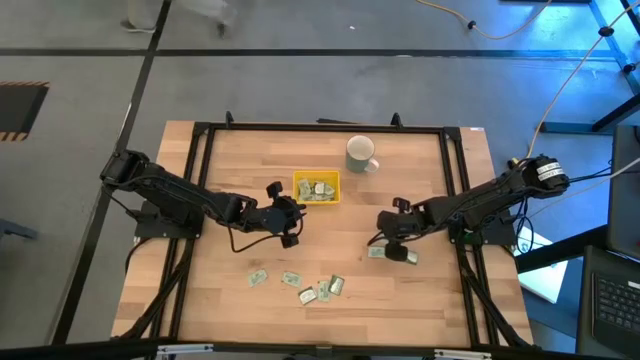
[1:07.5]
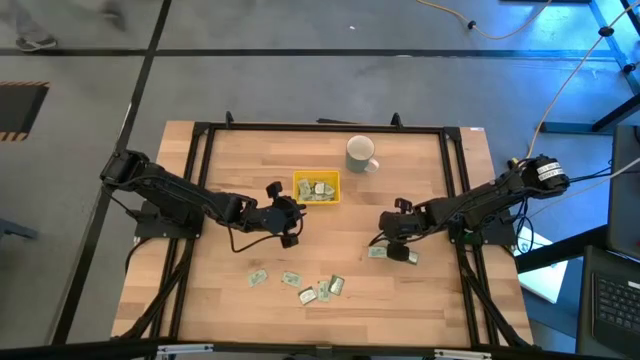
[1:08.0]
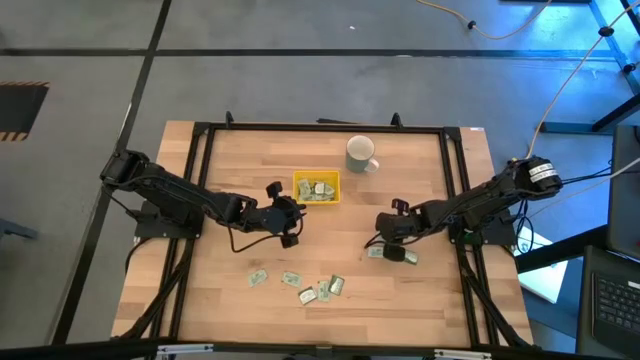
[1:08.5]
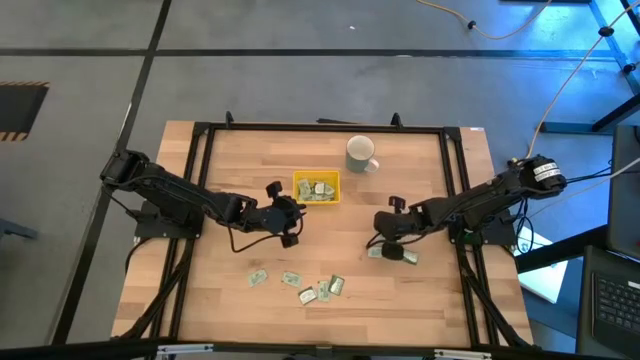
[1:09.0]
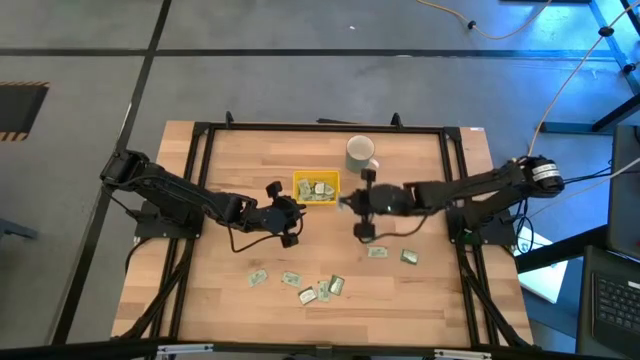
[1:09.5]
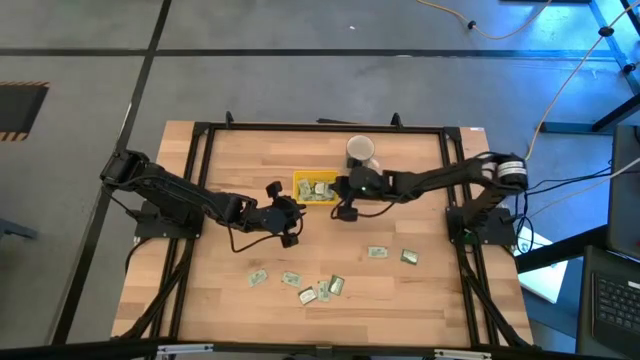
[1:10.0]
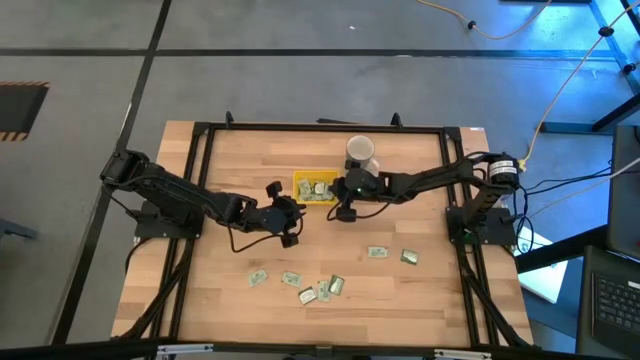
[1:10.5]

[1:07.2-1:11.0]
Task: Pick and place Stevia / Truvia into bins
Put the middle right stevia tea packet into the yellow bin

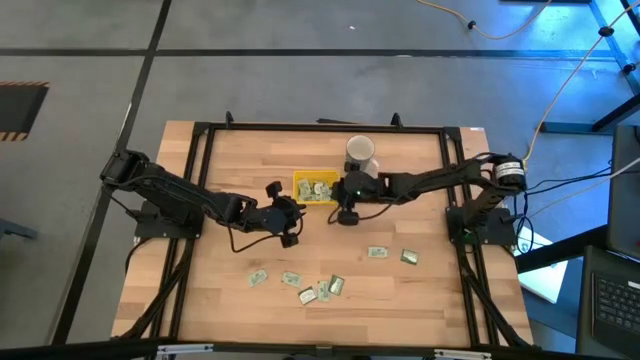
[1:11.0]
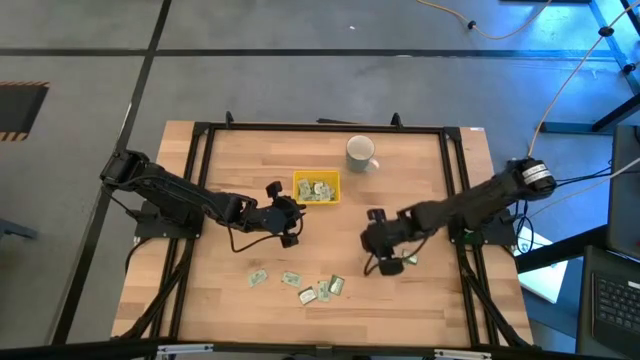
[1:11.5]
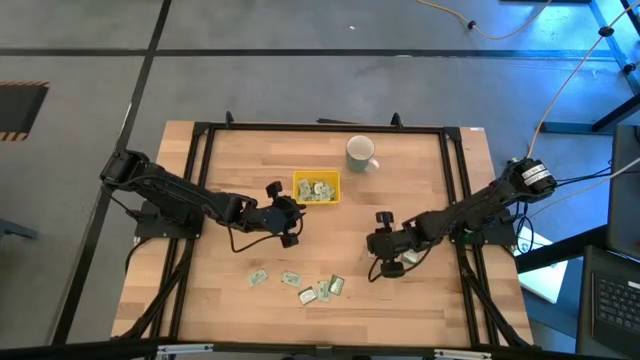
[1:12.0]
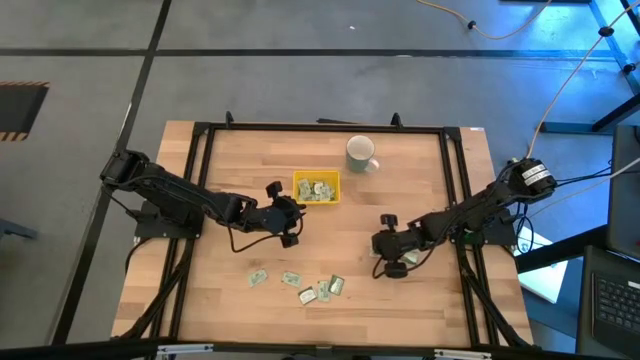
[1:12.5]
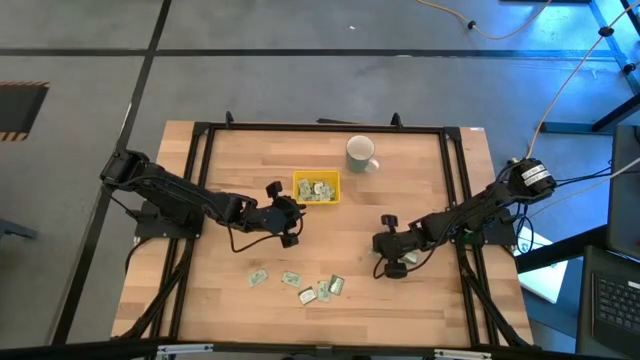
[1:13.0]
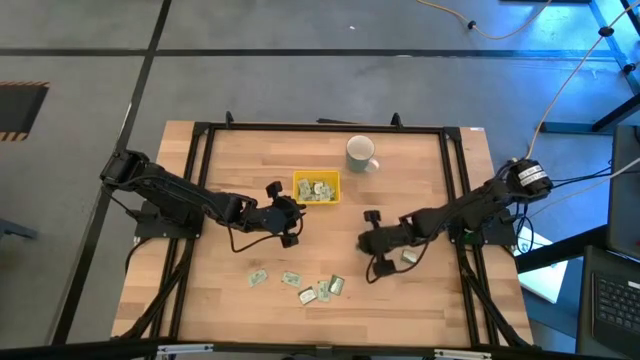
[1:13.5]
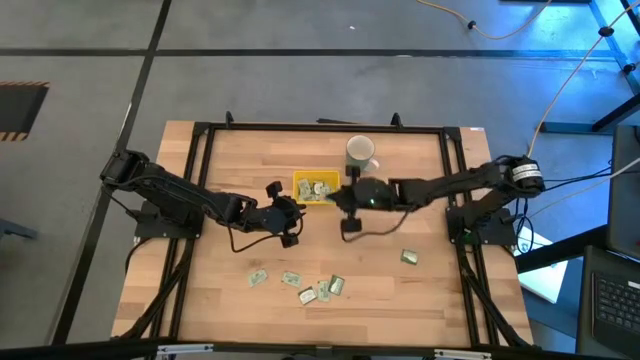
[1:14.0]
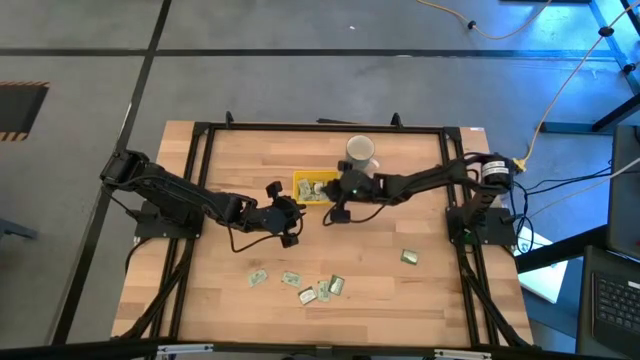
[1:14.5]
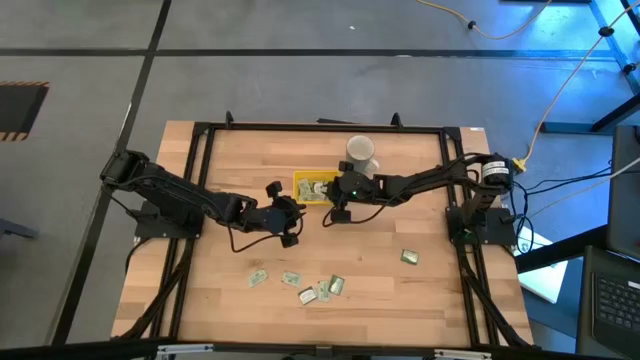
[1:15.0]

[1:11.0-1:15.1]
Put the middle right stevia tea packet into the yellow bin

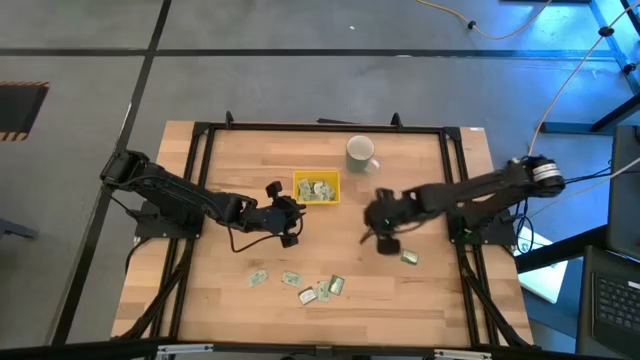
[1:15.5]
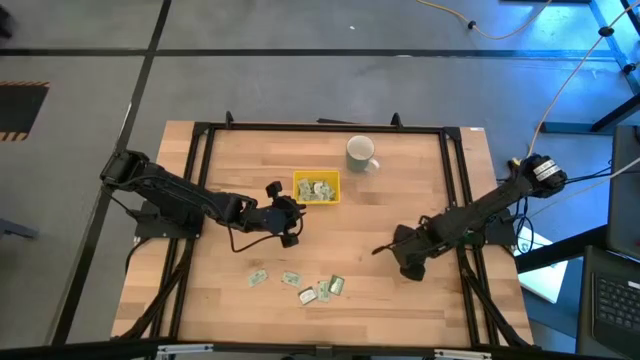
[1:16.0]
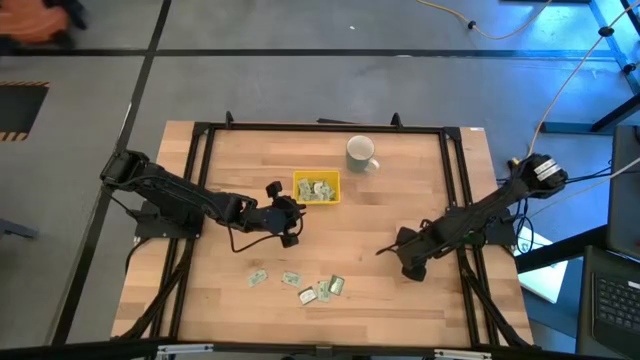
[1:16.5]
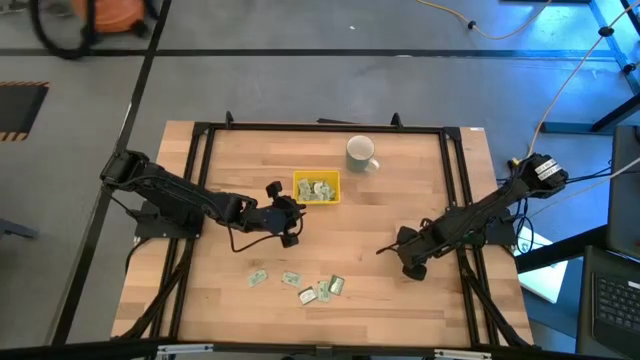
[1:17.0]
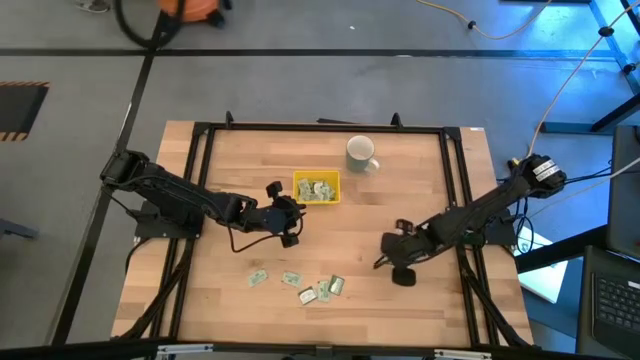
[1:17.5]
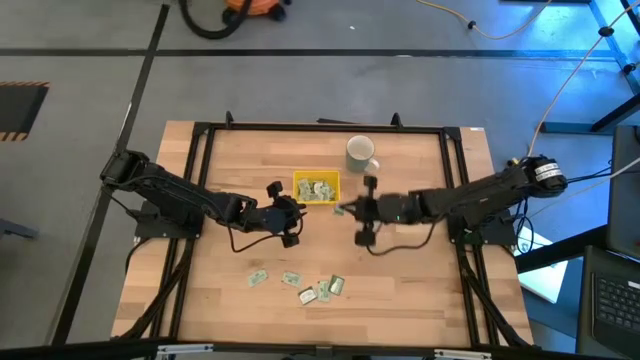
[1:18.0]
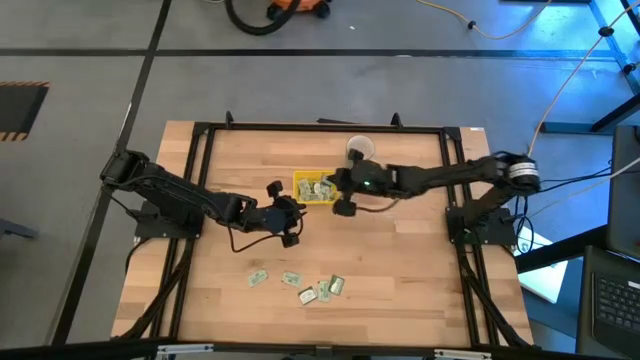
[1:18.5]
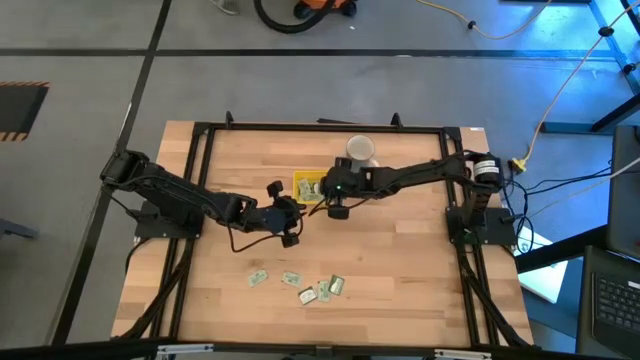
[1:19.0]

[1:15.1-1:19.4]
Put the middle right truvia tea packet into the yellow bin

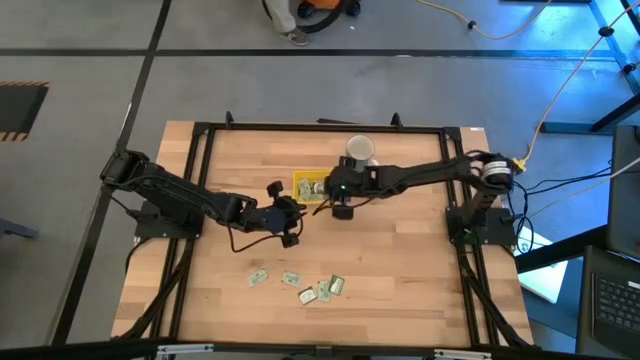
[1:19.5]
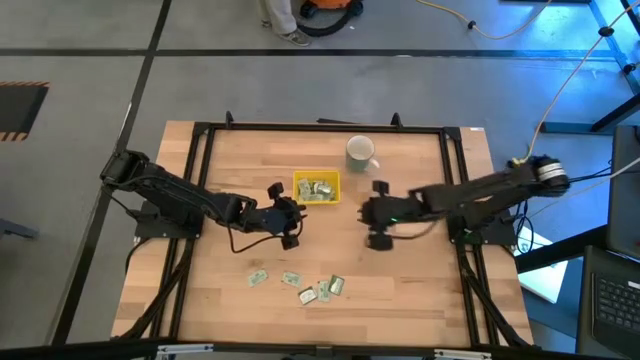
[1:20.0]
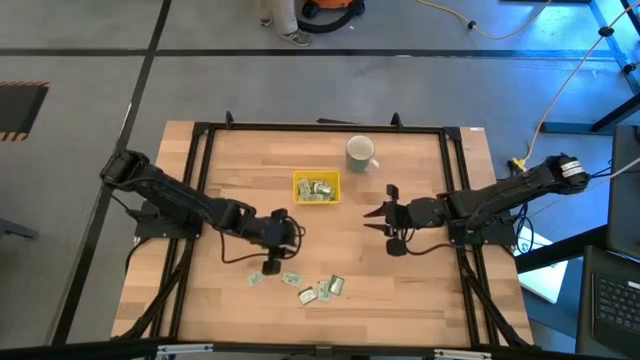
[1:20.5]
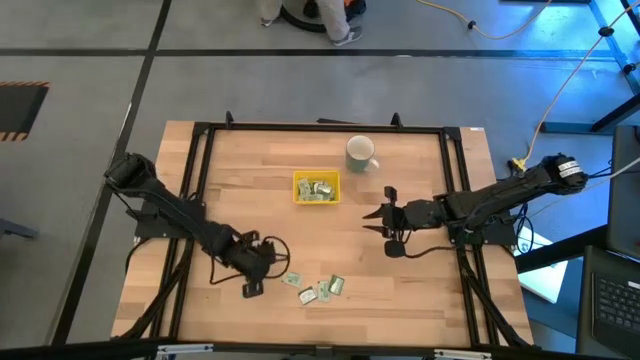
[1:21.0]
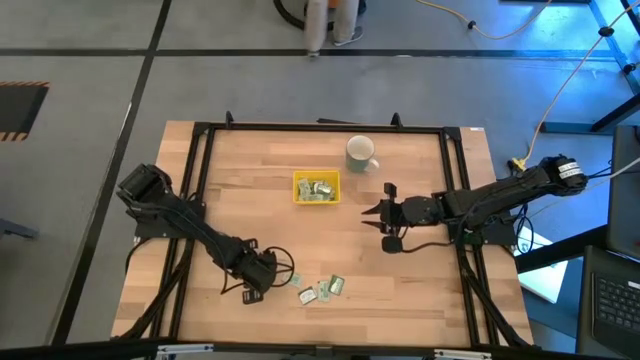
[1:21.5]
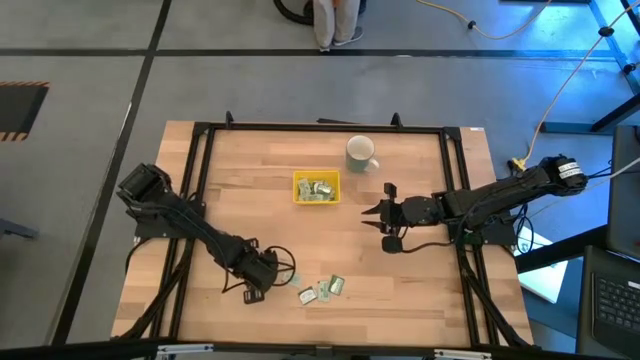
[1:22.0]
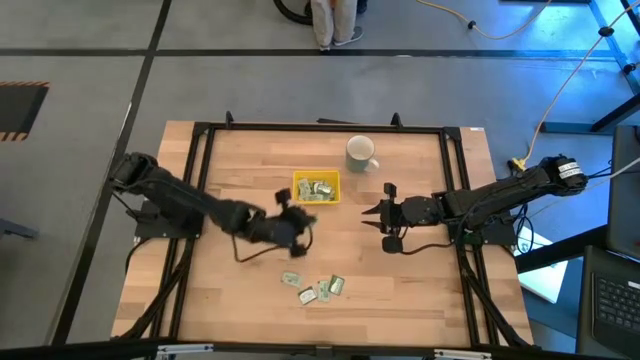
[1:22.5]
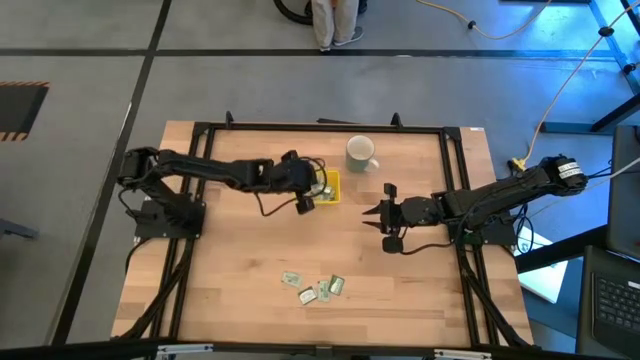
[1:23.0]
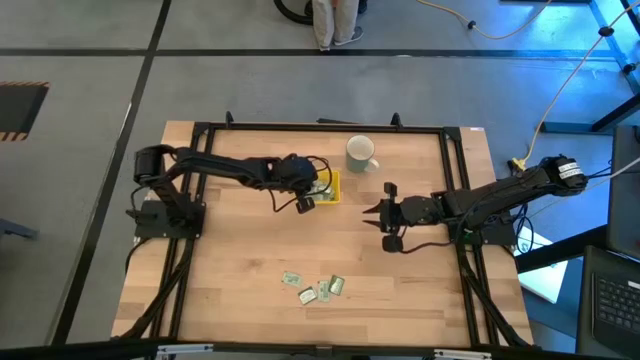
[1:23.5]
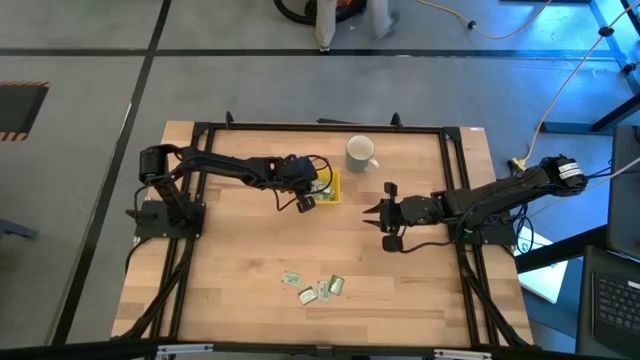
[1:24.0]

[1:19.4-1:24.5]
Put the bottom left stevia tea packet into the yellow bin

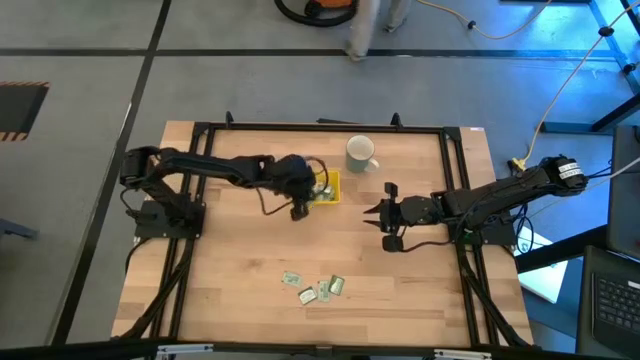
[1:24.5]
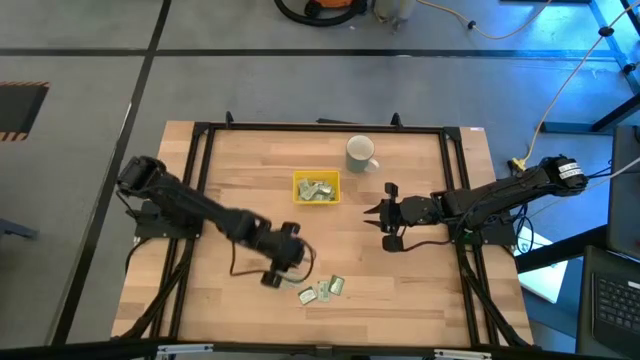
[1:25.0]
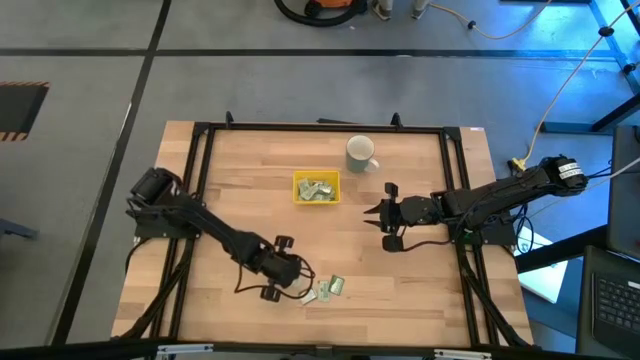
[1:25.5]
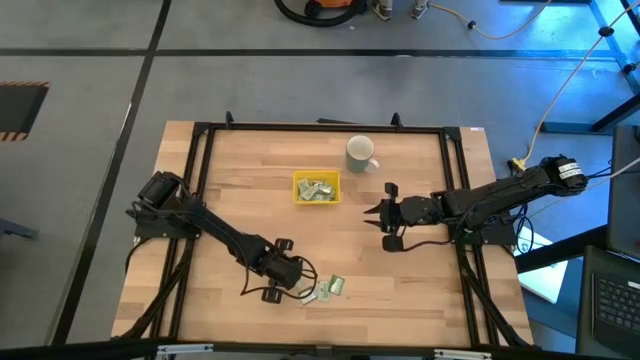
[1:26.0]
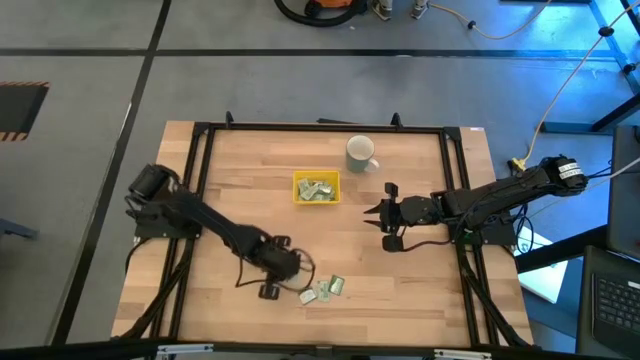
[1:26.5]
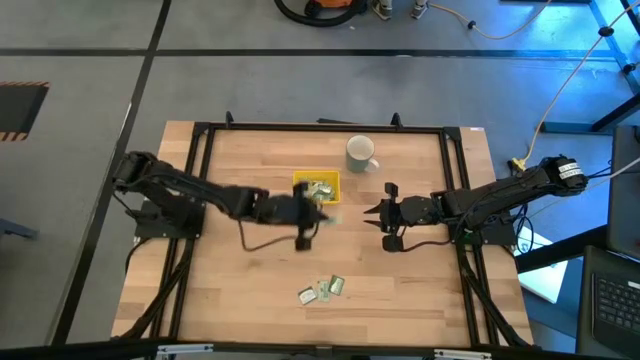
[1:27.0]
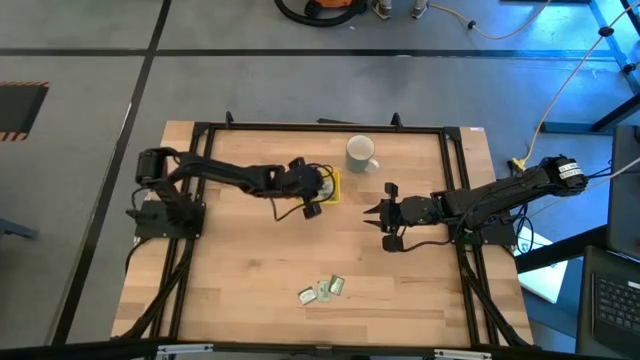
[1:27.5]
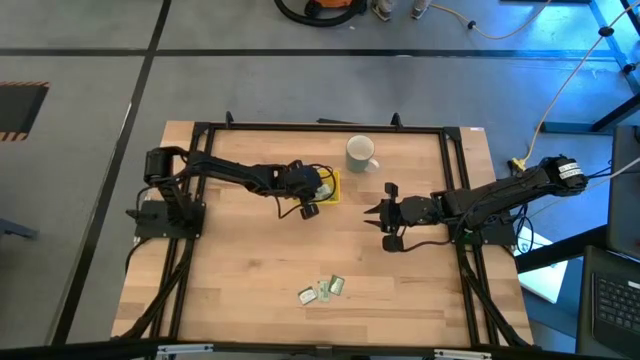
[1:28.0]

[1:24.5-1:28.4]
Put the left stevia tea packet into the yellow bin

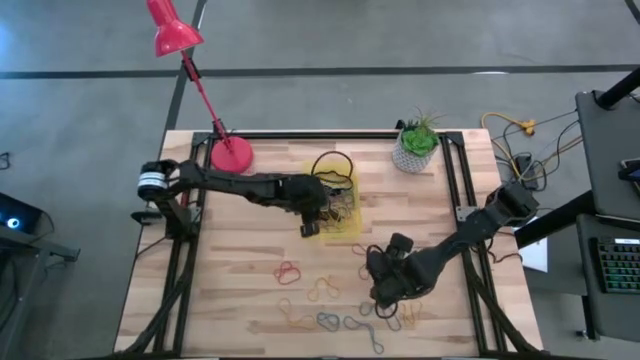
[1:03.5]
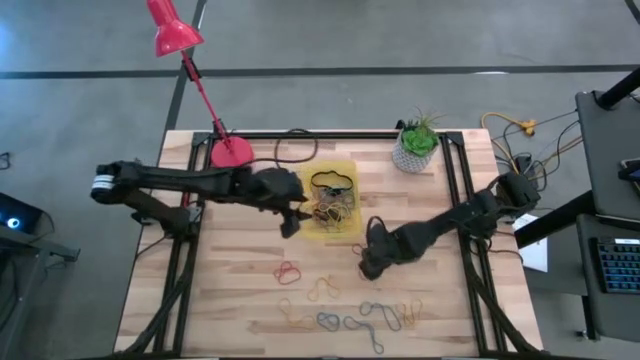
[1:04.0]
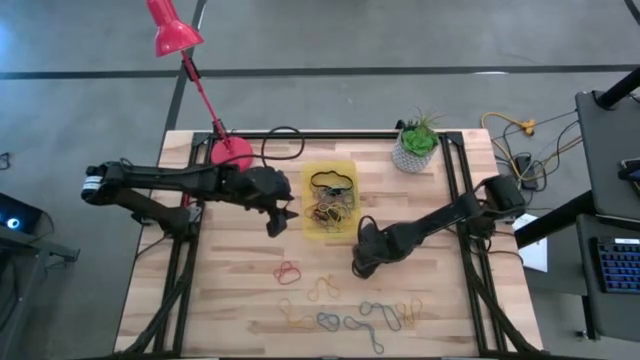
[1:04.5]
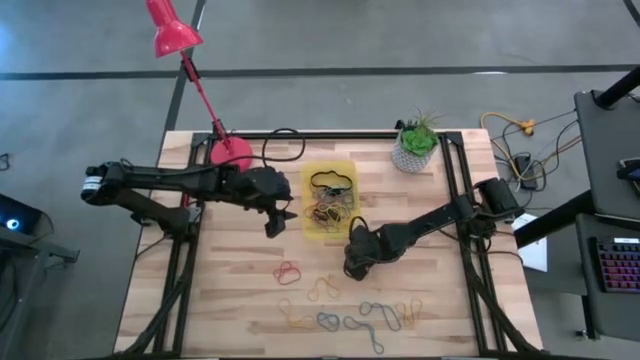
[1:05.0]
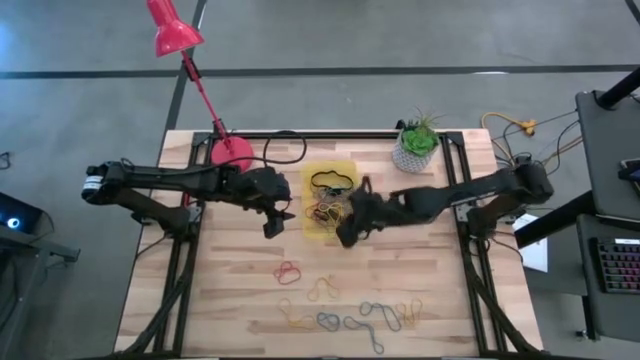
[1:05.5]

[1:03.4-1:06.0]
Task: Pick and place rubber bands into bin
Put the red rubber band into the yellow bin
